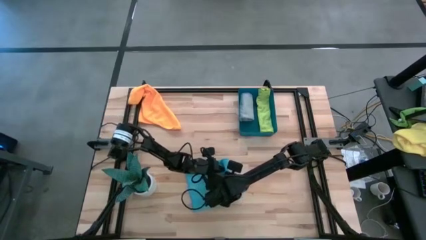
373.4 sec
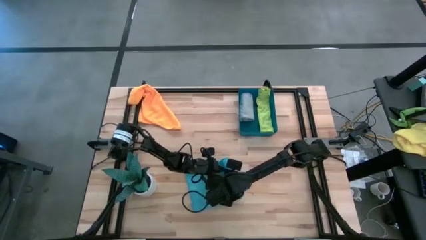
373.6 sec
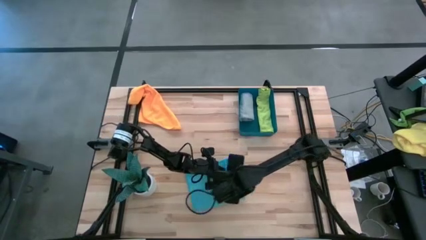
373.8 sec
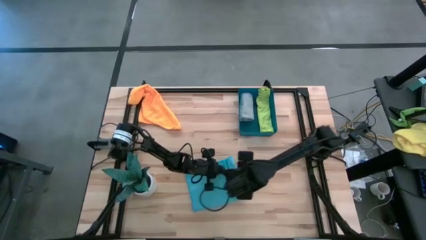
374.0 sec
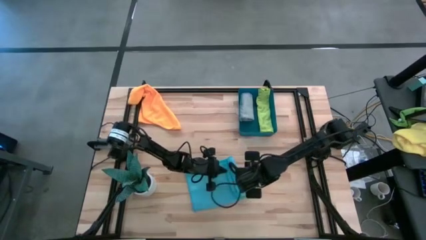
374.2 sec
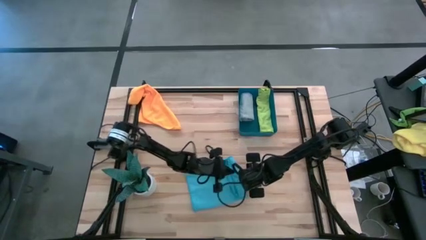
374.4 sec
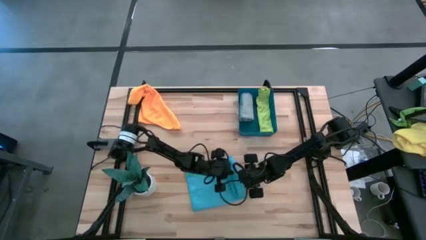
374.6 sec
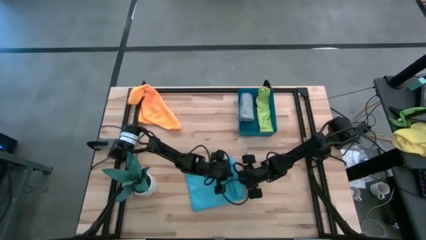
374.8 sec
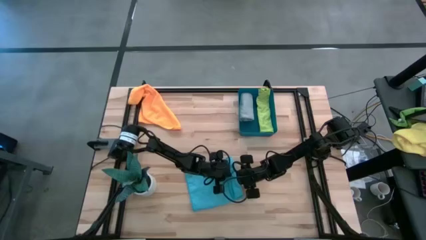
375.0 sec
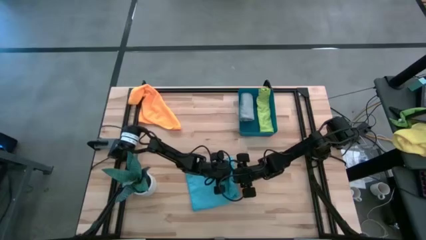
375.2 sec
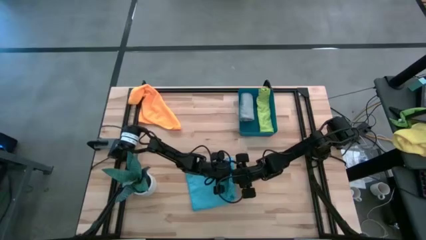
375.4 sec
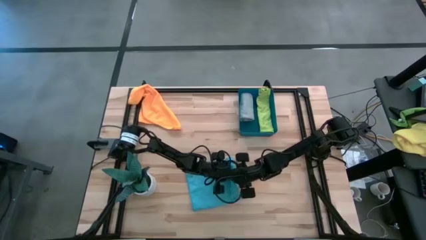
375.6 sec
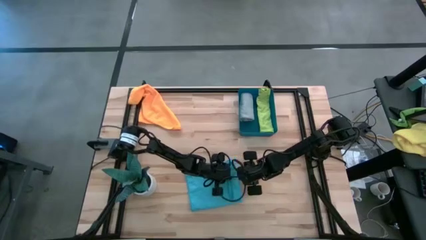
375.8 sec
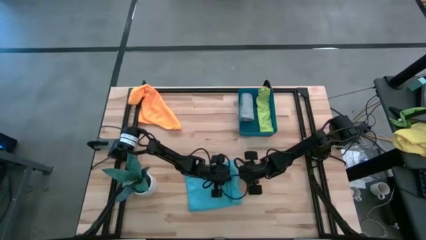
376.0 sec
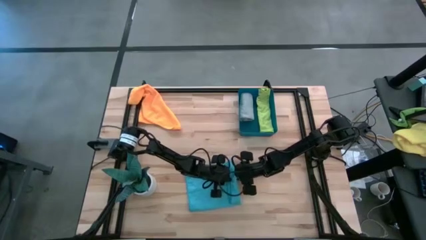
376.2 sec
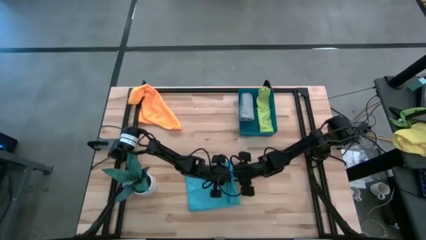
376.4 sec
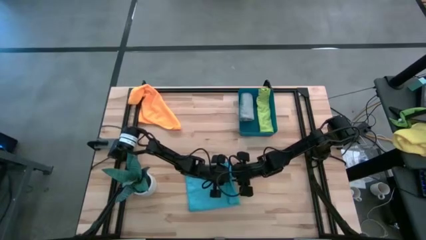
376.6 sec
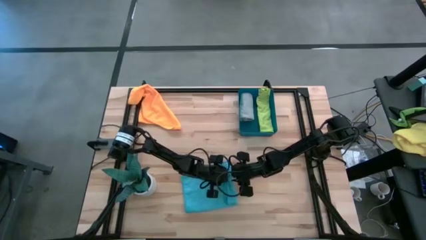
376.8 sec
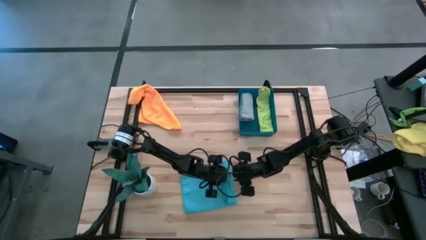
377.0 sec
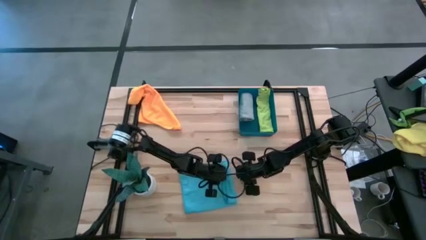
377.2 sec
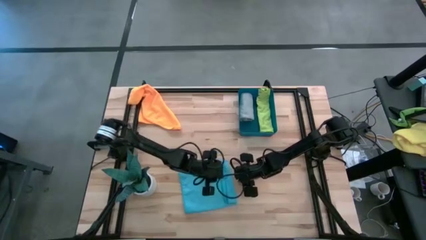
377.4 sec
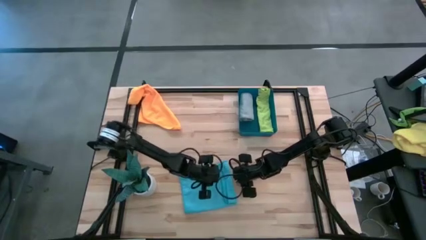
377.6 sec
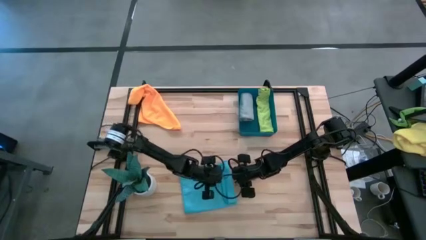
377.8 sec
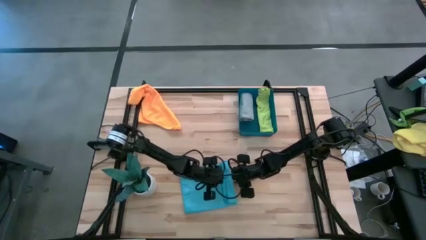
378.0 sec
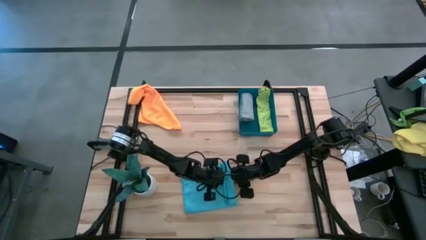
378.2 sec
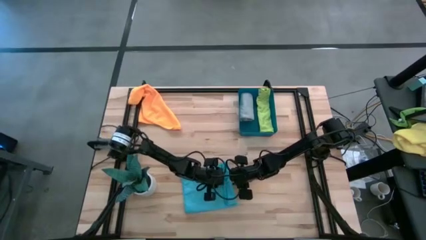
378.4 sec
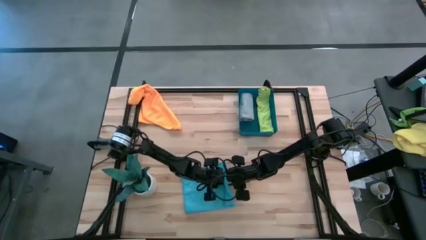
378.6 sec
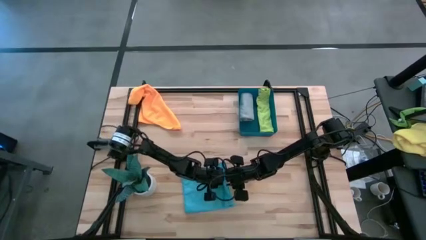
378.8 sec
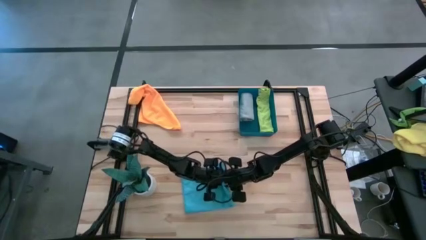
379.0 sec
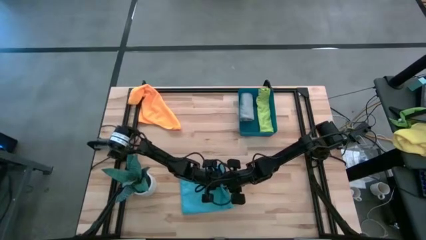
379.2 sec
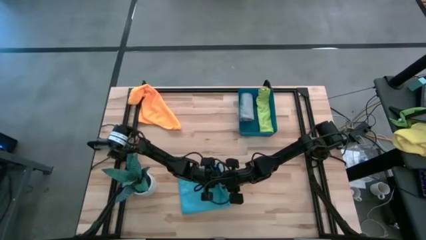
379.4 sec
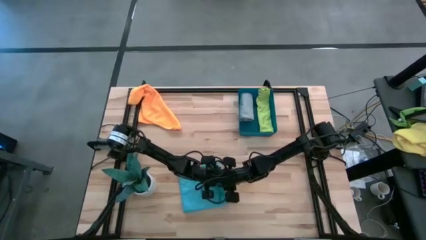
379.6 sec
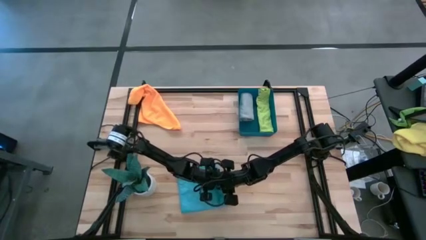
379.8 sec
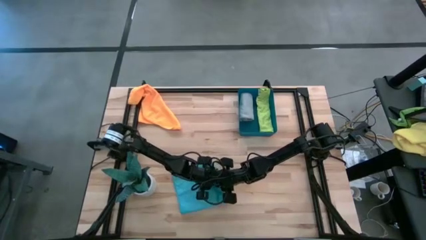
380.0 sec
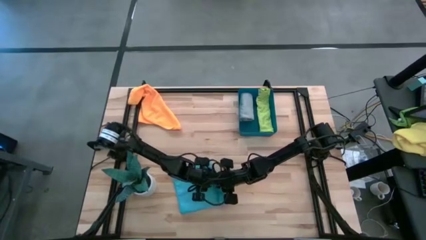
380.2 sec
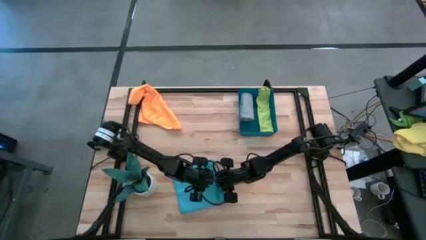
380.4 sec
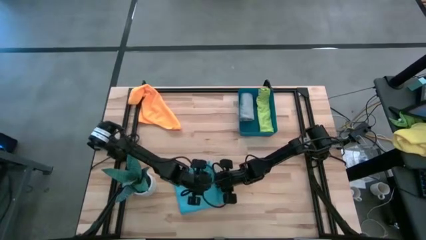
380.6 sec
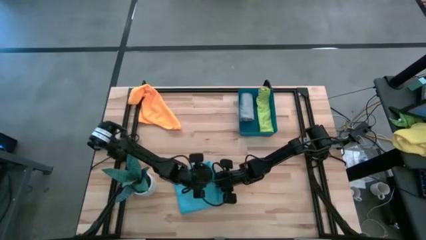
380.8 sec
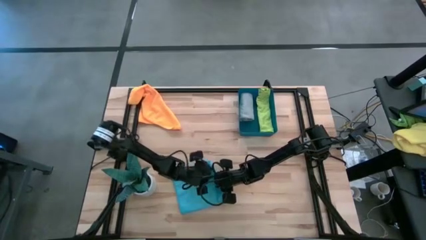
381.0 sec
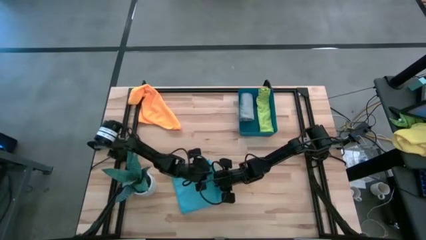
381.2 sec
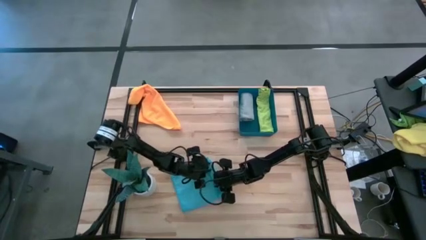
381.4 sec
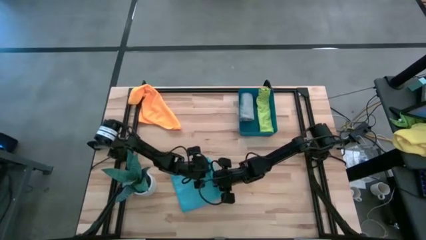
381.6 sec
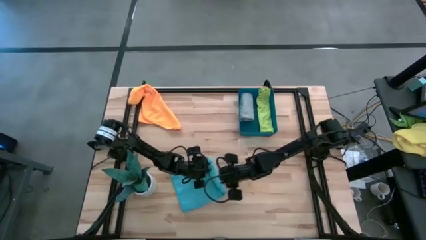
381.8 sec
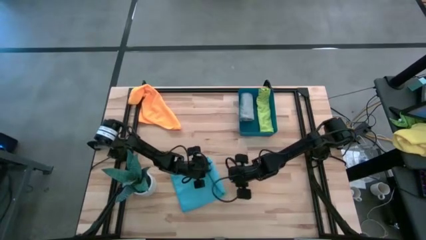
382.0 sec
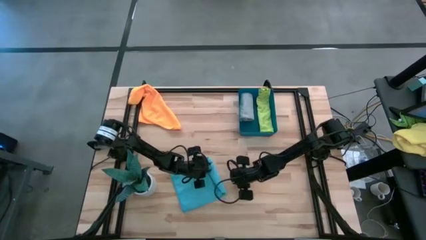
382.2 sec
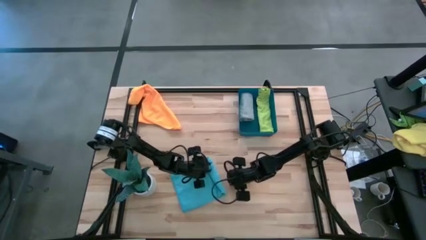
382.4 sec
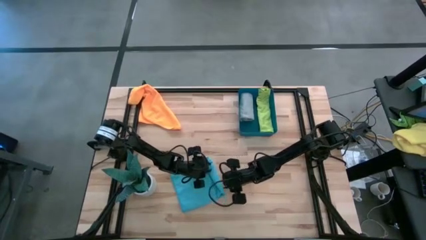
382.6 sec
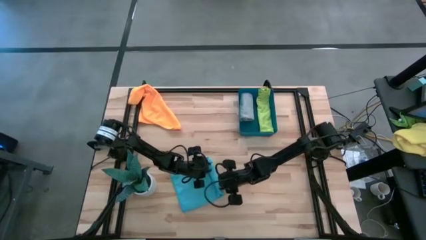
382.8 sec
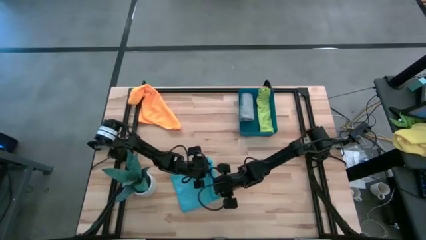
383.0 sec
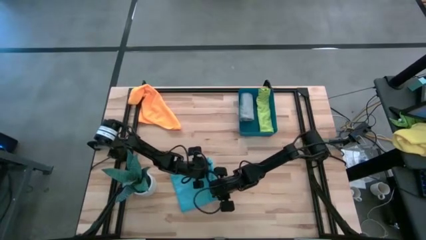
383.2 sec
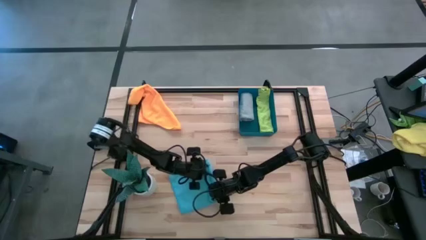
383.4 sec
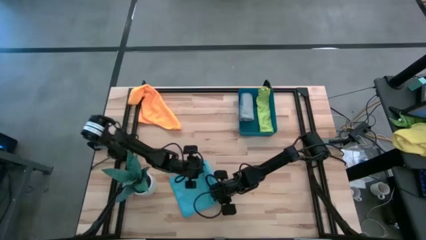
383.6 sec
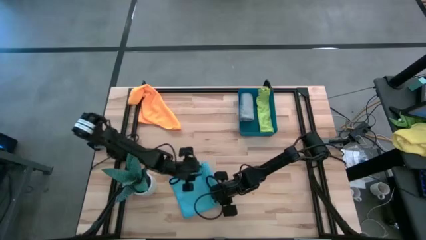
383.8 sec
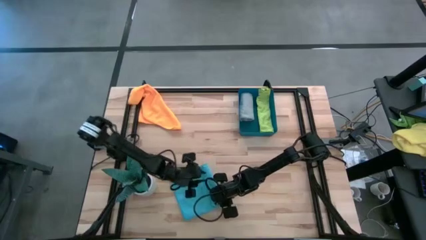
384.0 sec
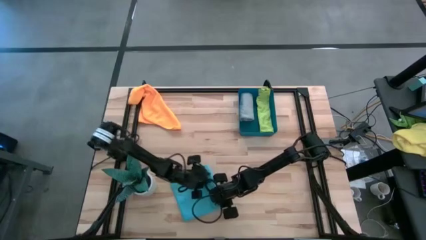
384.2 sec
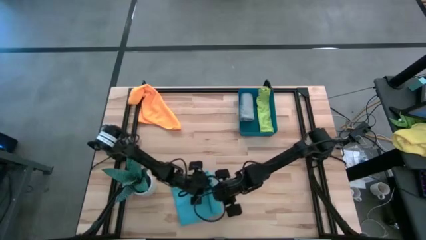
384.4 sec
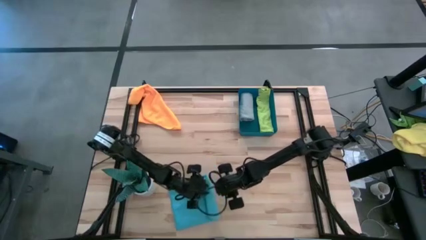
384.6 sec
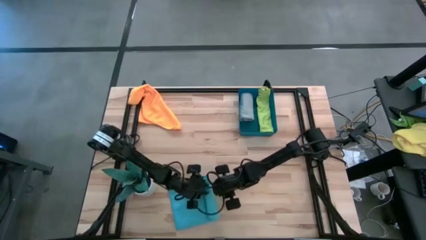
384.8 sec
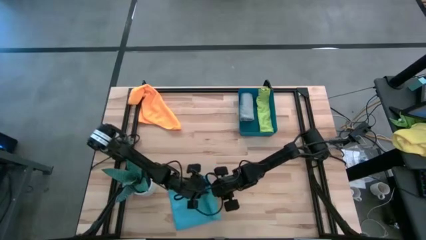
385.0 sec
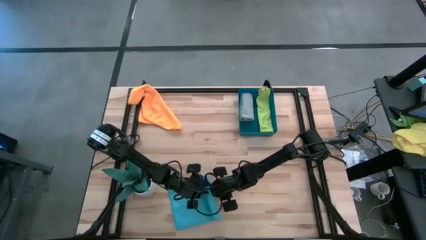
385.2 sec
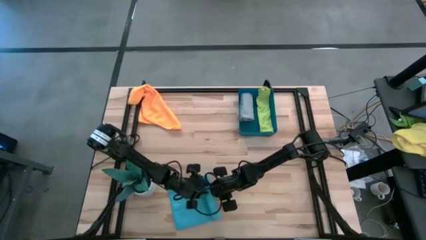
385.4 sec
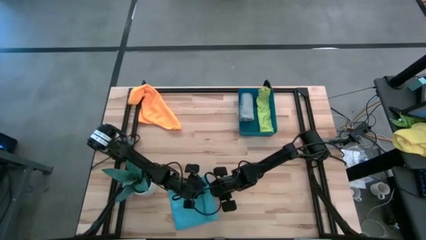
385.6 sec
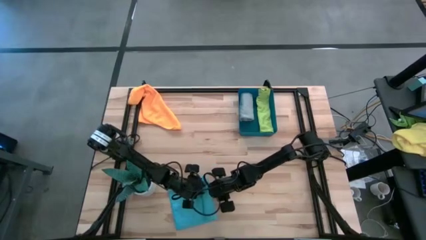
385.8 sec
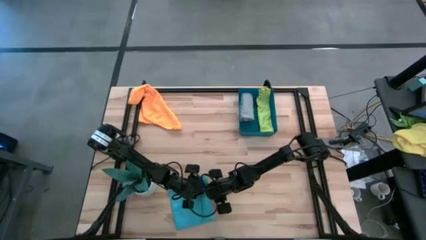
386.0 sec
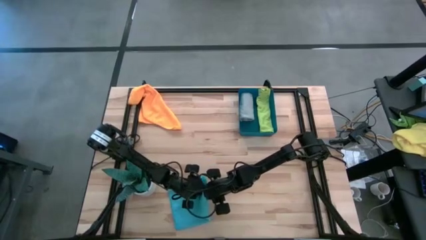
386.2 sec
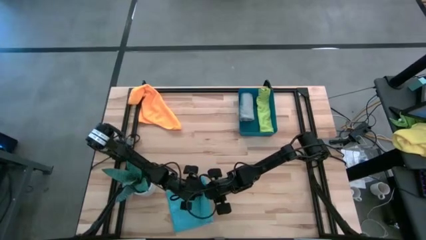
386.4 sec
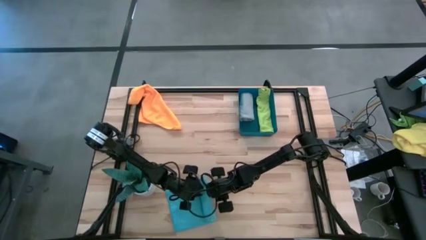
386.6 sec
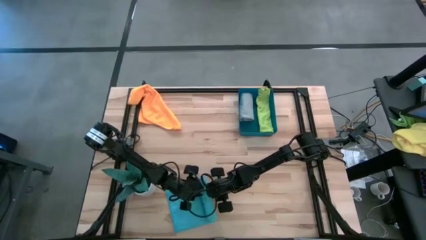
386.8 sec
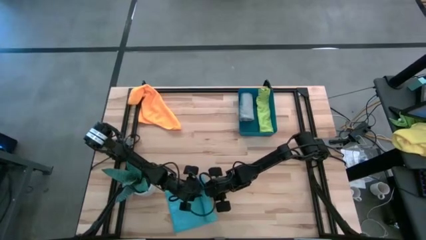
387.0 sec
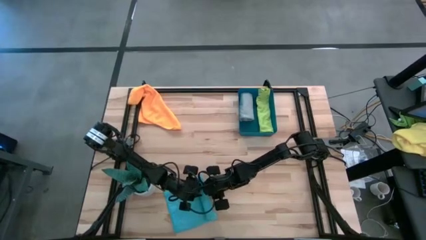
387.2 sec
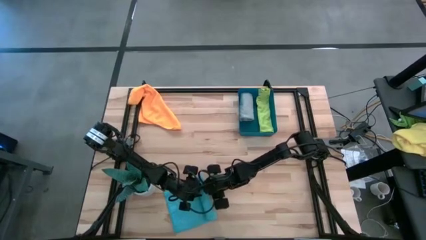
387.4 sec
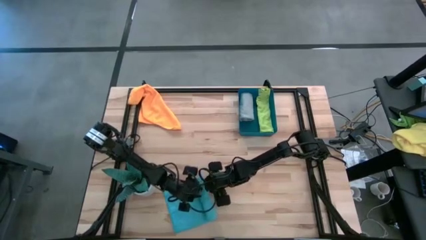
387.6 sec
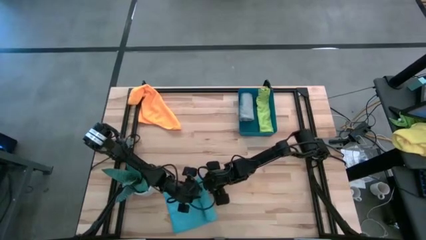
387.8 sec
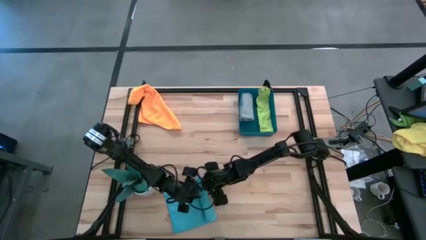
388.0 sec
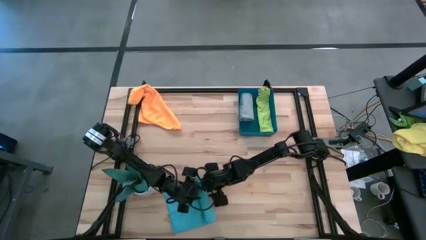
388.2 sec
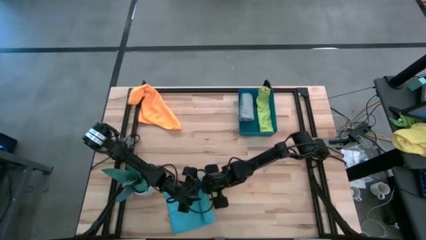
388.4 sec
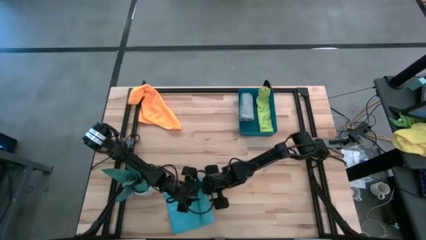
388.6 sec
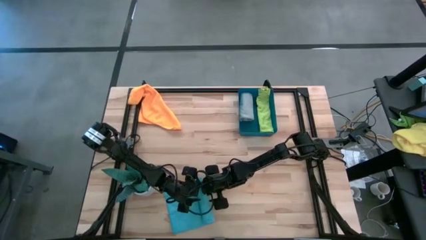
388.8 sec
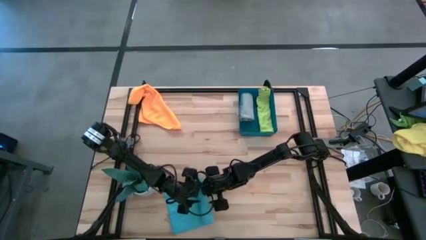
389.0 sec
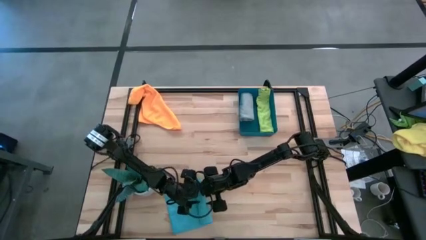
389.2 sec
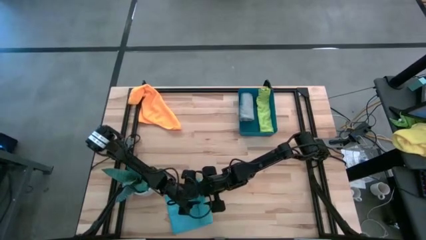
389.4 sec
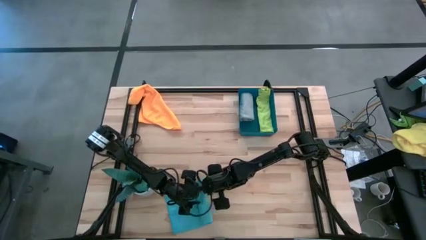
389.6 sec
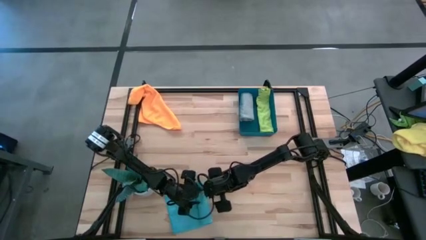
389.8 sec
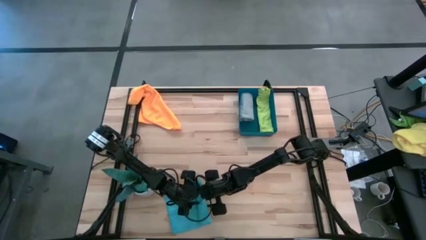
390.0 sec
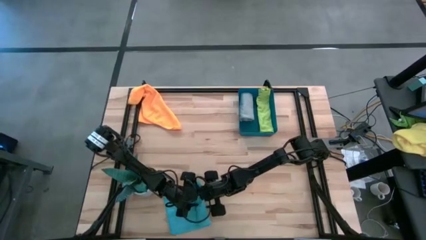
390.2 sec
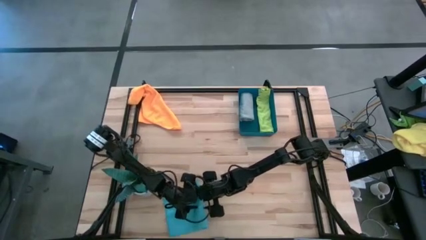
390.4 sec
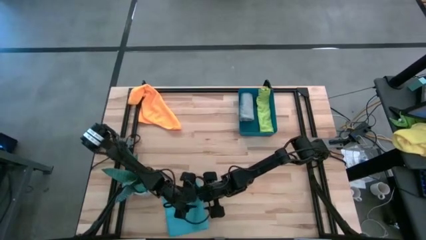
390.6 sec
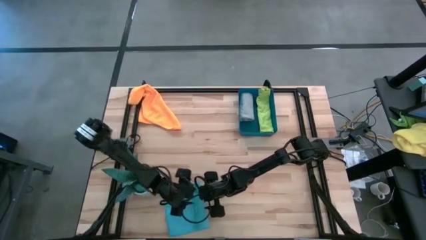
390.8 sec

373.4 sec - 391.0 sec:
Task: Roll microfiber towels into tight, uniform cylinder then place into a basket
Roll the blue towel
